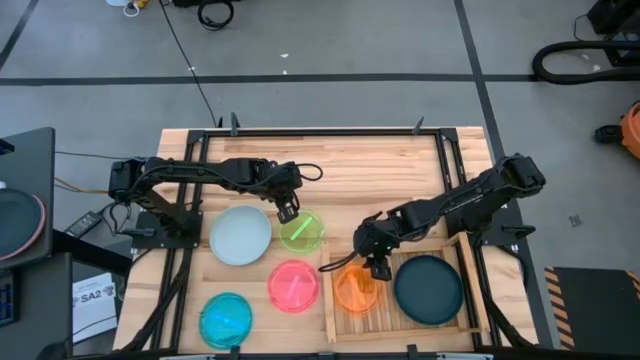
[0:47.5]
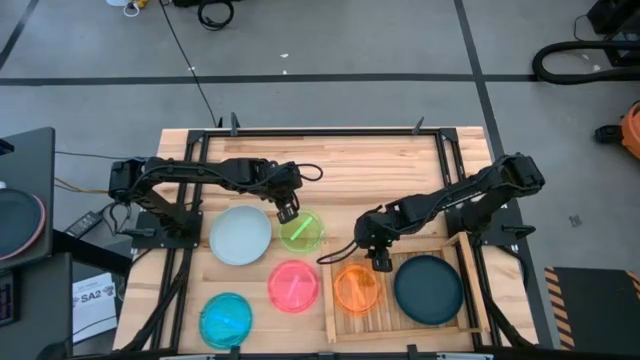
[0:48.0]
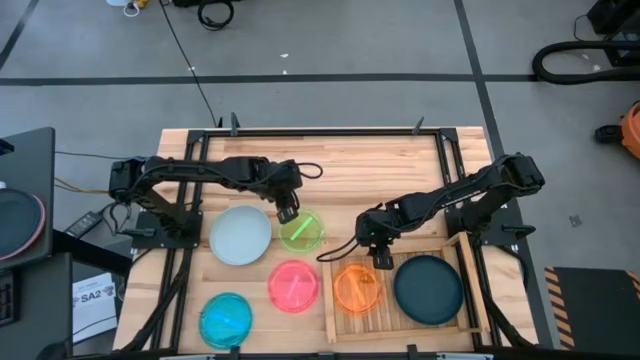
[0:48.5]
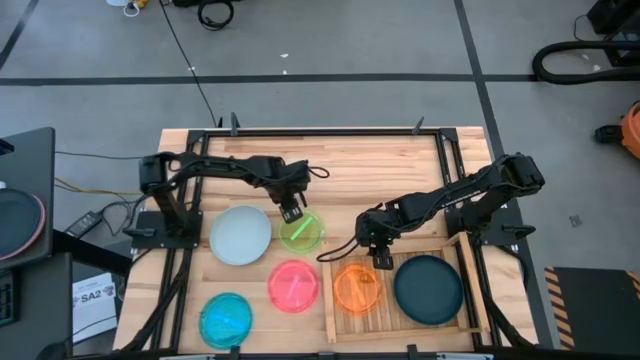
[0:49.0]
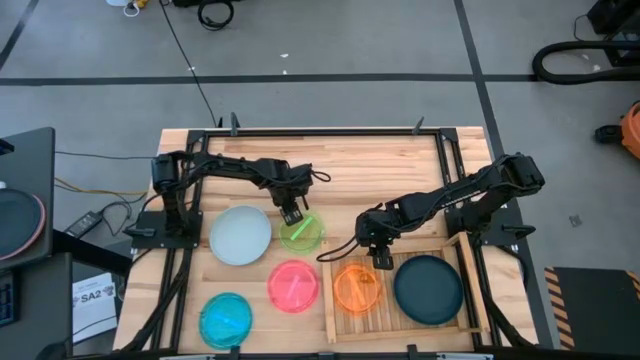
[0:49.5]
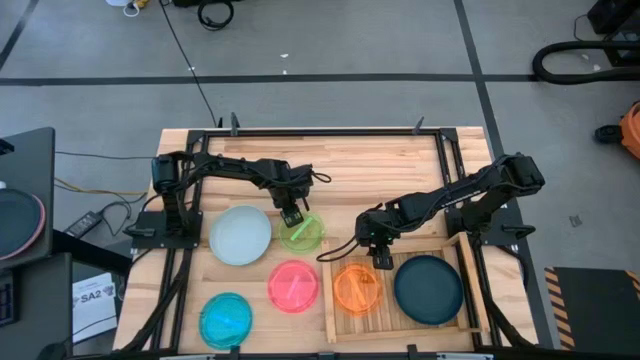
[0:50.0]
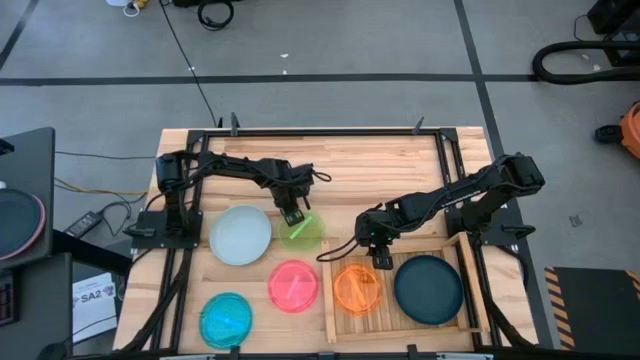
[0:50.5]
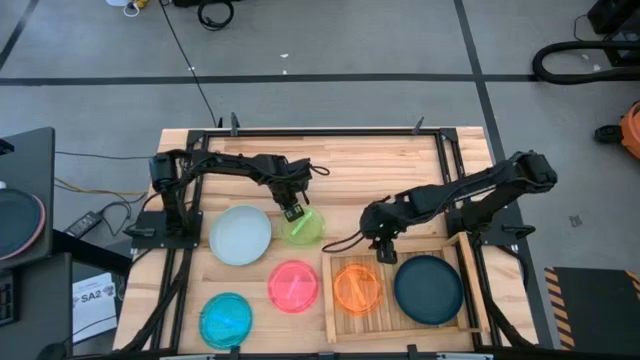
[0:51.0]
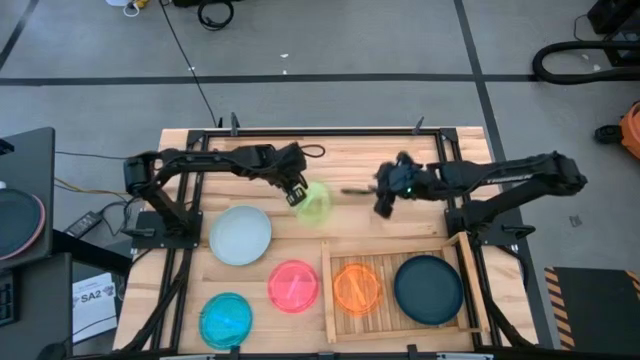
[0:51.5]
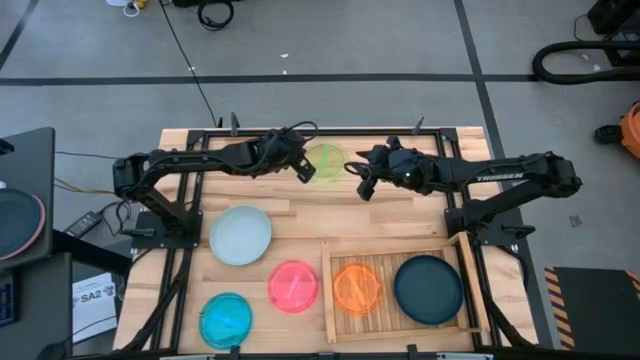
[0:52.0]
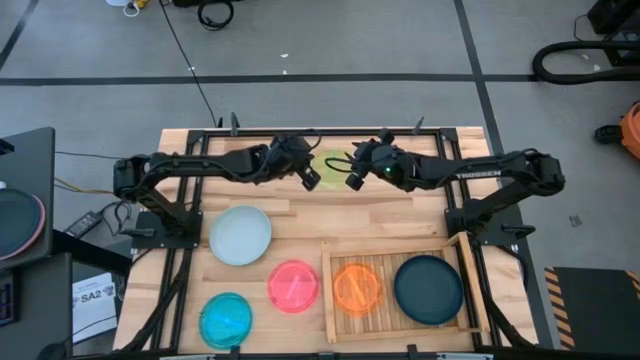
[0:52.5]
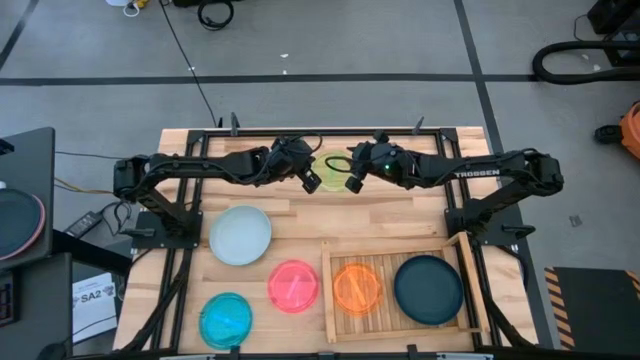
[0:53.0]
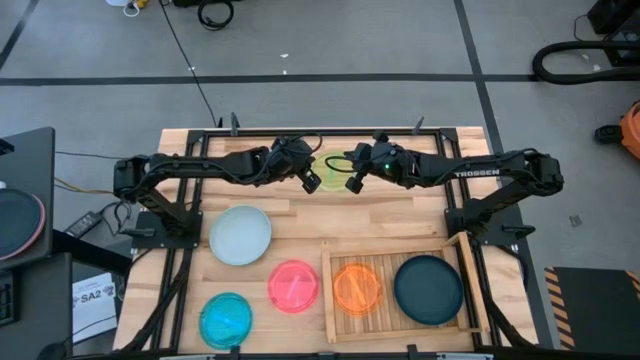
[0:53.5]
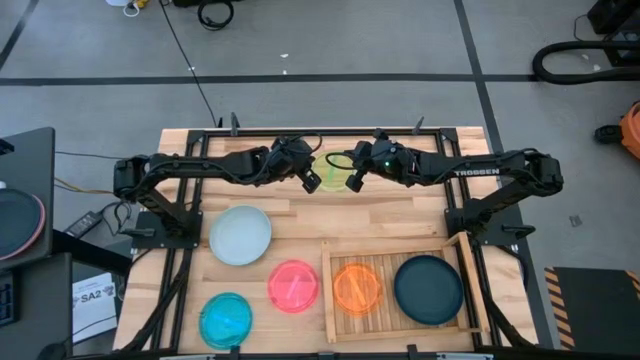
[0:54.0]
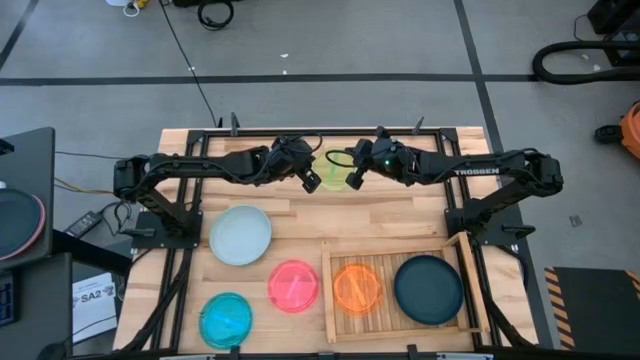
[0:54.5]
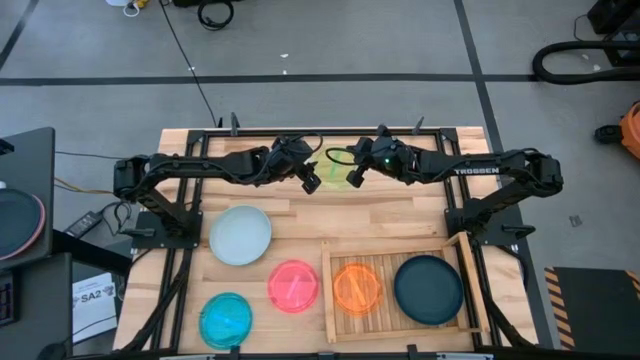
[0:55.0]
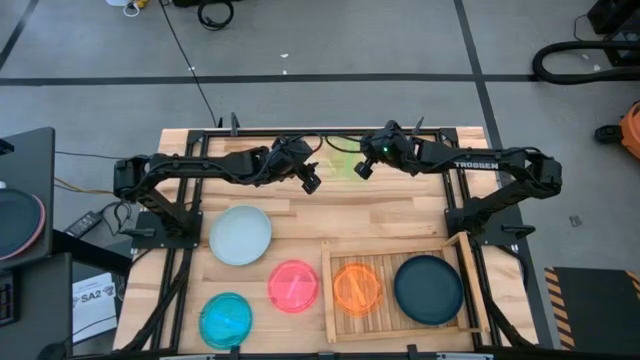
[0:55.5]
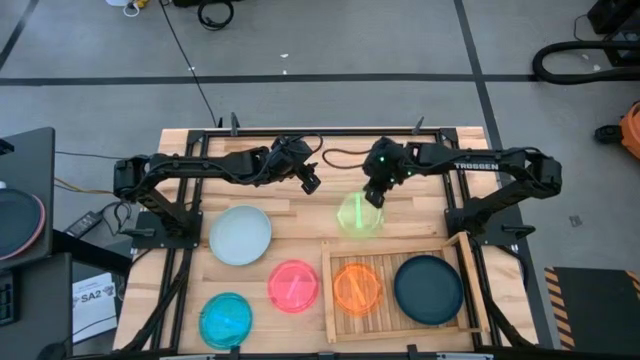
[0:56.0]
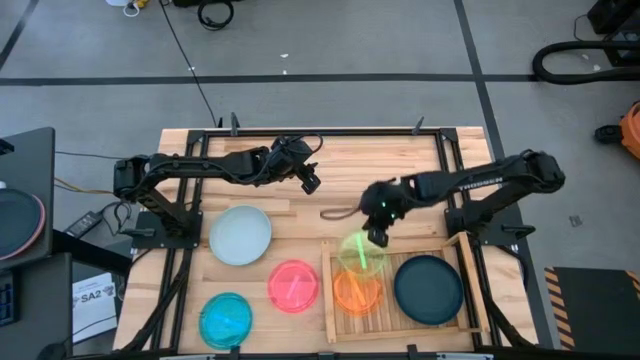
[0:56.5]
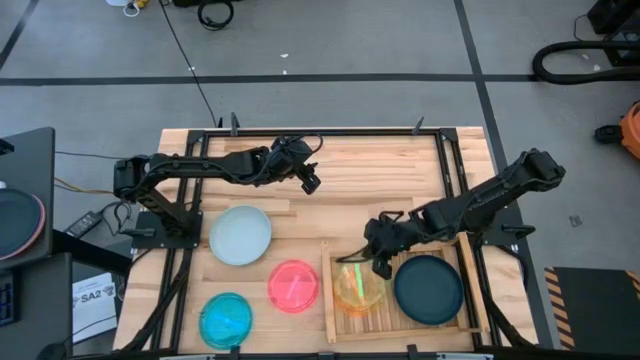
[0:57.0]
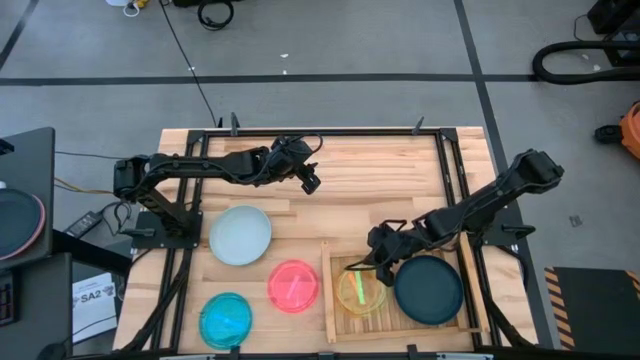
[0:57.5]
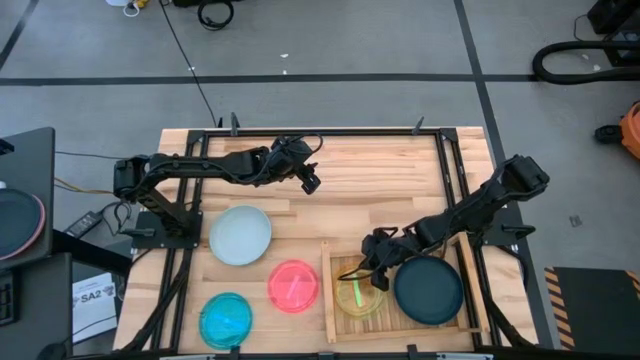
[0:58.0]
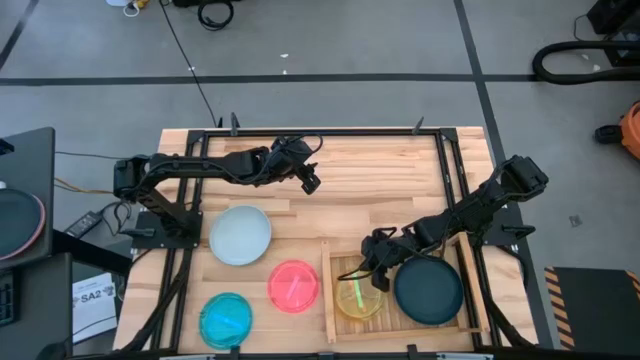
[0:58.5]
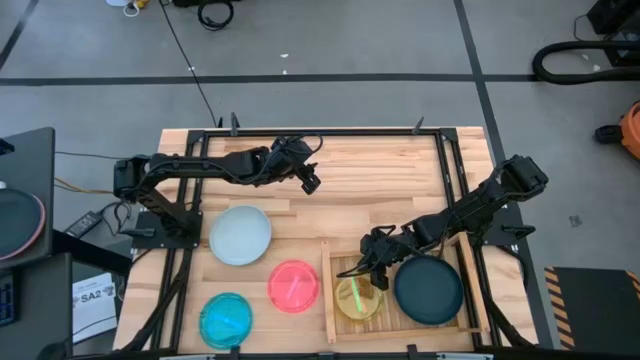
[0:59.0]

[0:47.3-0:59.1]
Task: Place and stack plates onto a shelf
Stack the green plate on the orange plate on the shelf

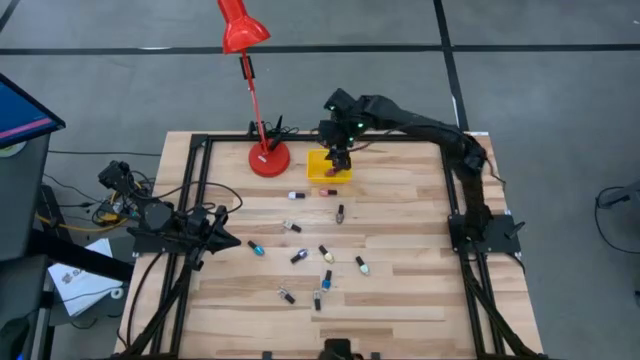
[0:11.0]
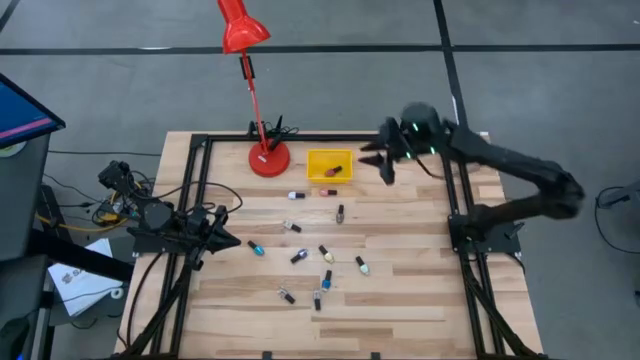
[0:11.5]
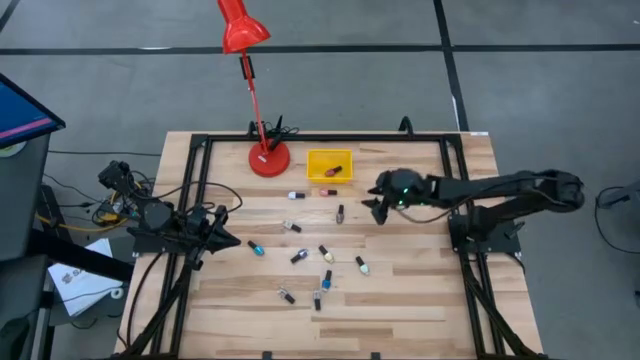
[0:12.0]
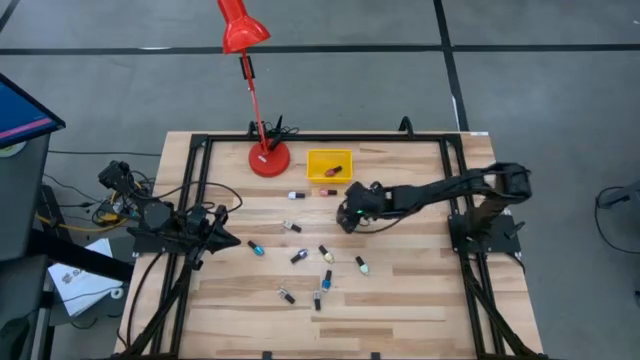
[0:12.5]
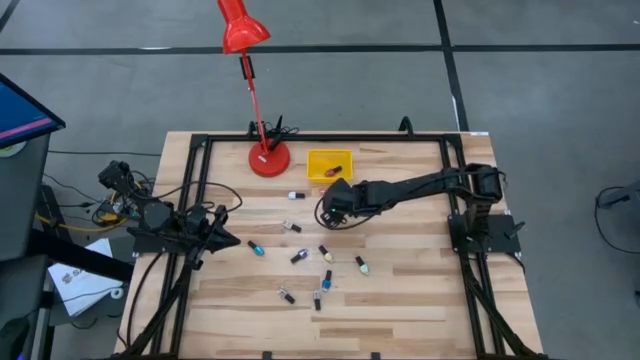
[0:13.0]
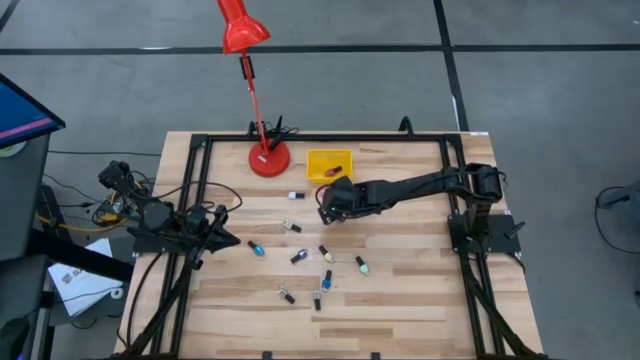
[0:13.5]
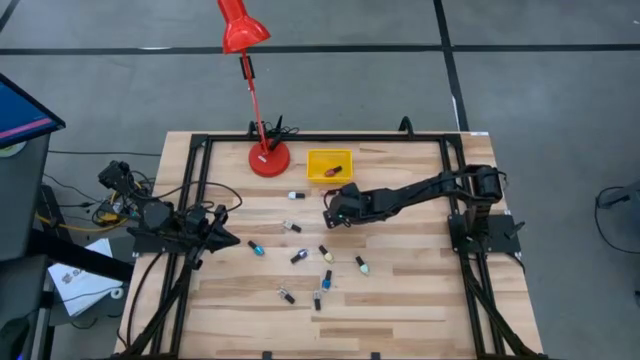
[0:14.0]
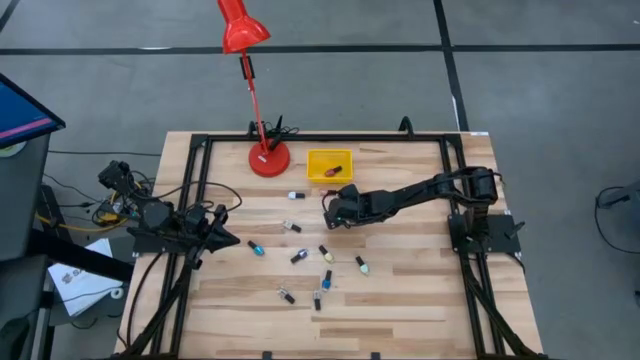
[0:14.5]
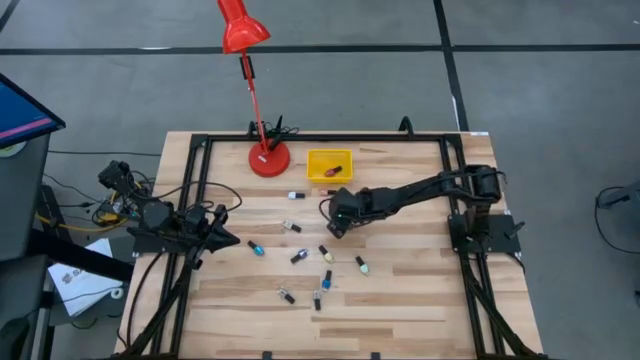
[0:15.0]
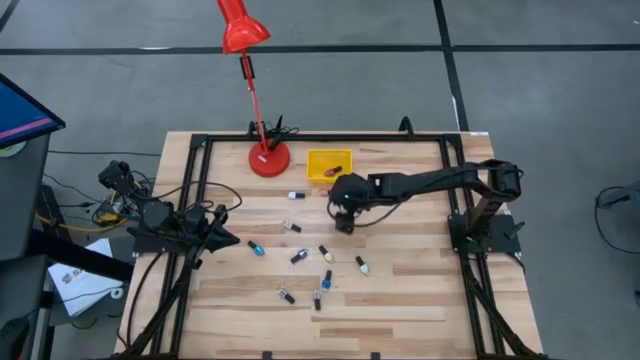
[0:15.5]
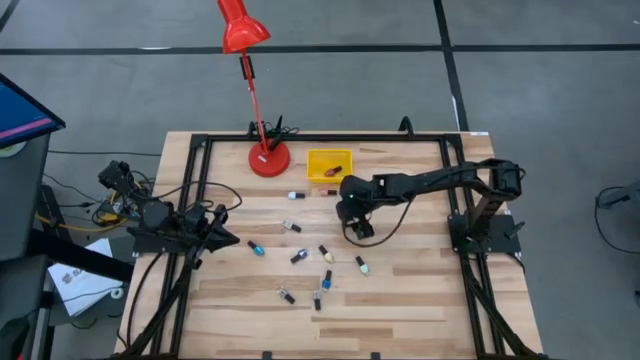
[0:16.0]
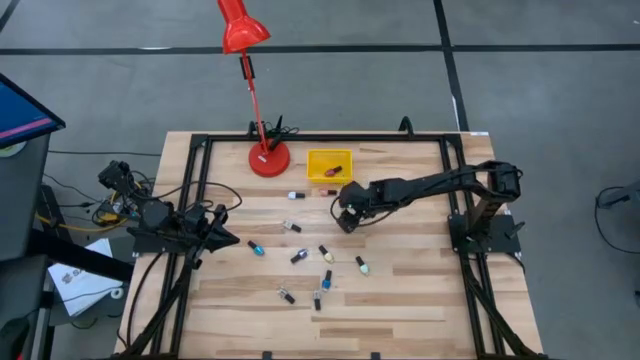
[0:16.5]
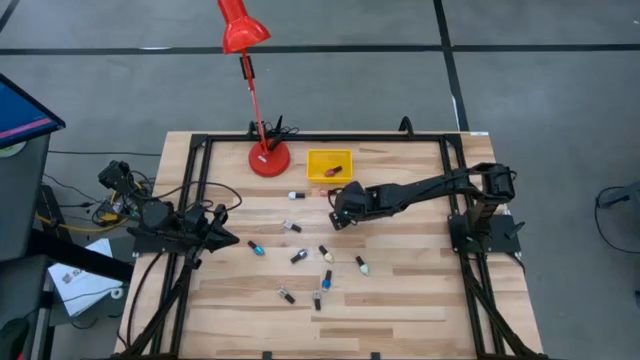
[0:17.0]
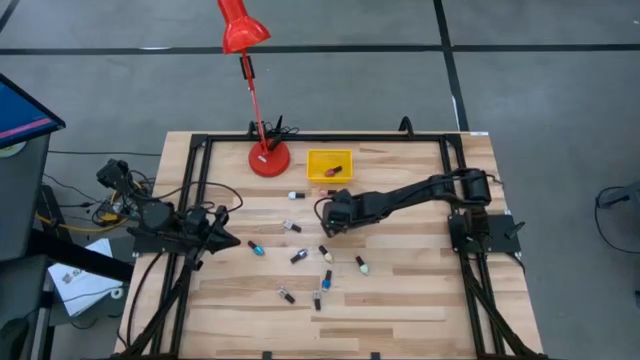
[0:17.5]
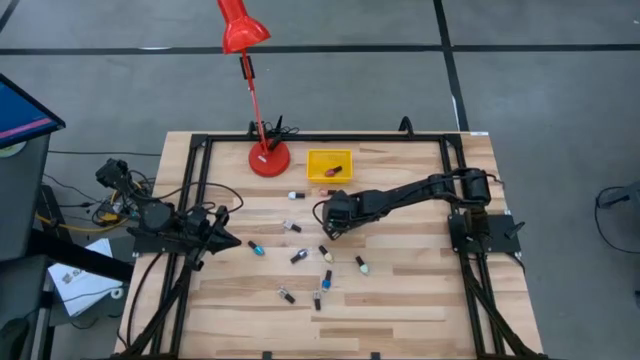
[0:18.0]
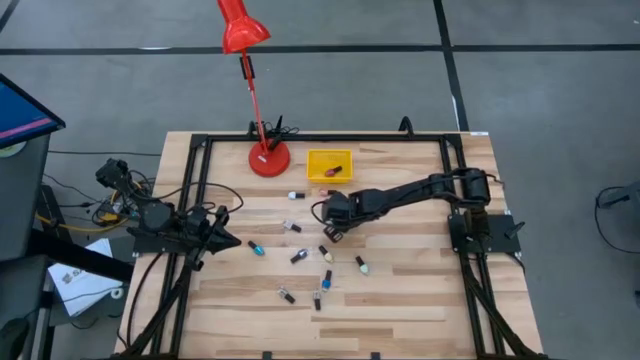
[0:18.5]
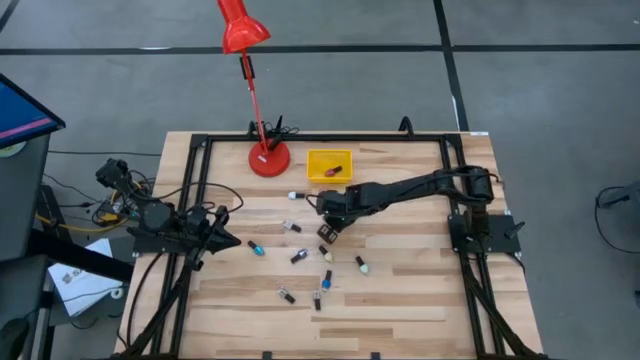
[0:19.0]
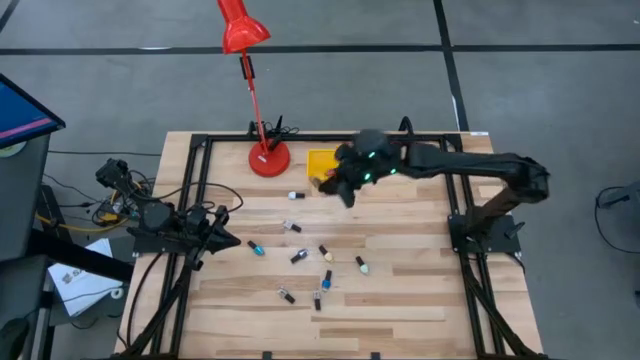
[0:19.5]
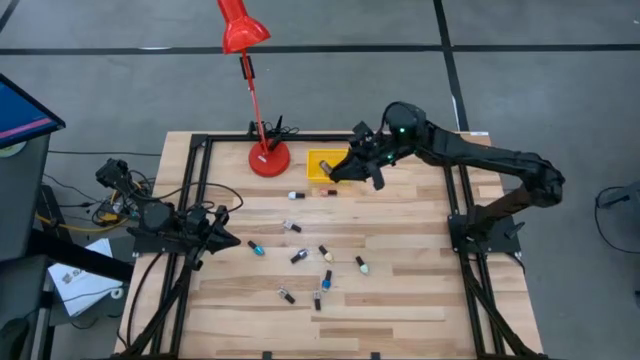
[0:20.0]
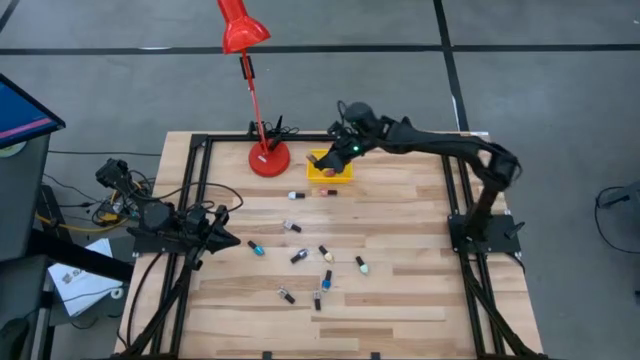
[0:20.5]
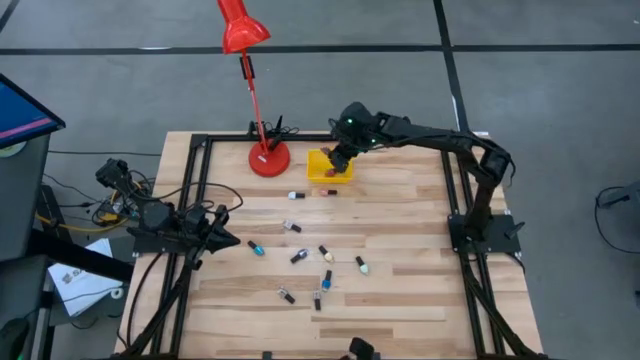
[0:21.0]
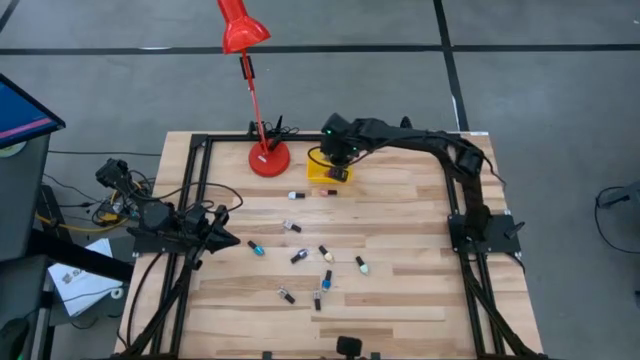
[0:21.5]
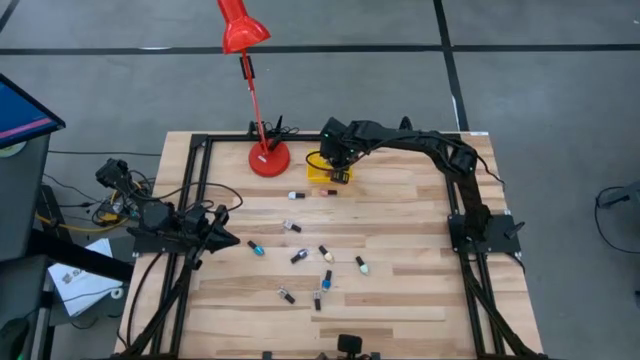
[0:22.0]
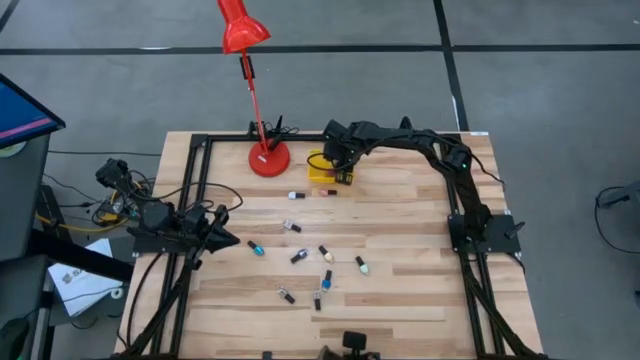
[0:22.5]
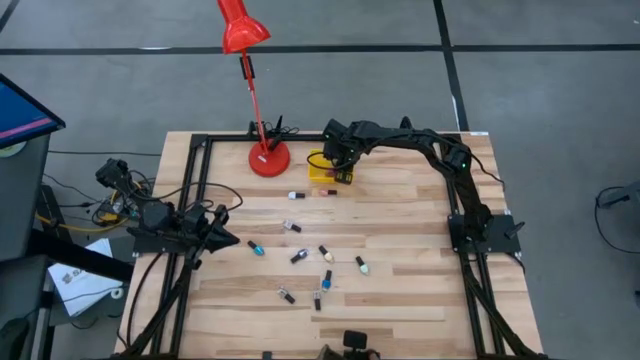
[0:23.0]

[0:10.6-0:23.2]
Task: Pick & Place Nail Polish
Put the brown nail polish bottle into the yellow bin
